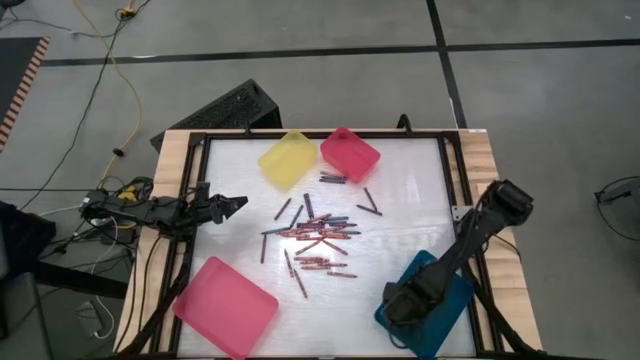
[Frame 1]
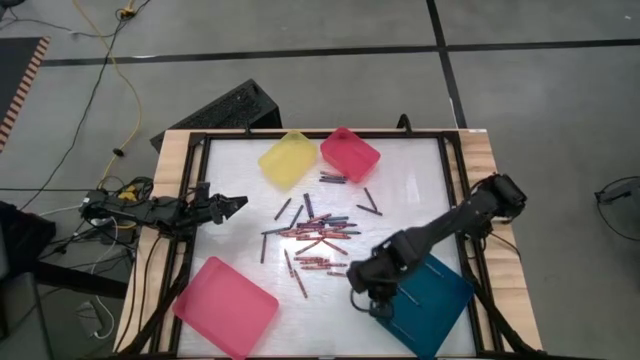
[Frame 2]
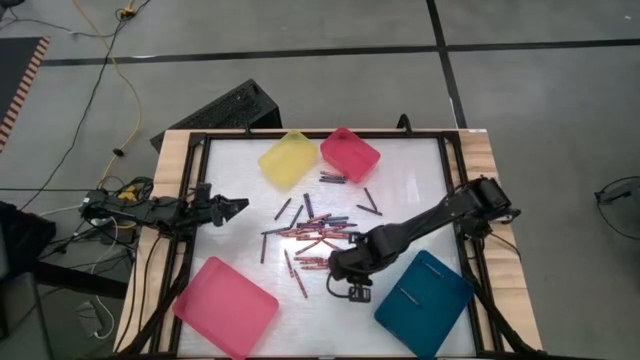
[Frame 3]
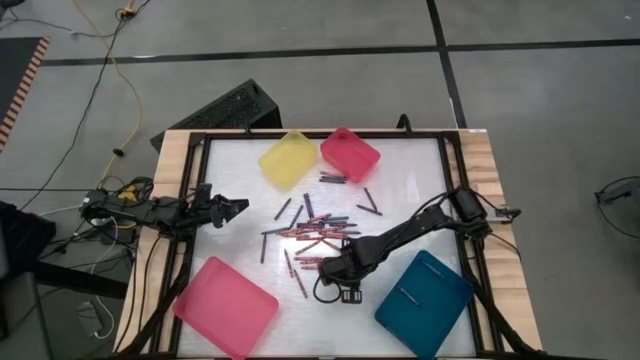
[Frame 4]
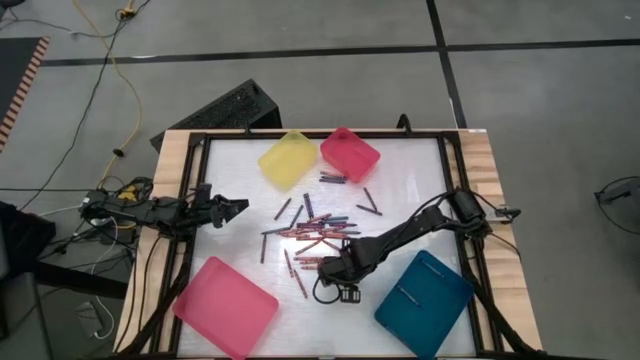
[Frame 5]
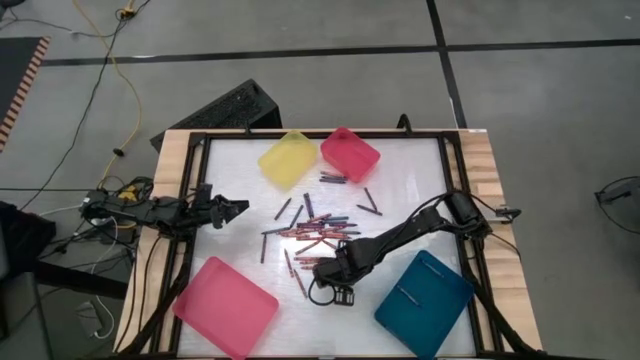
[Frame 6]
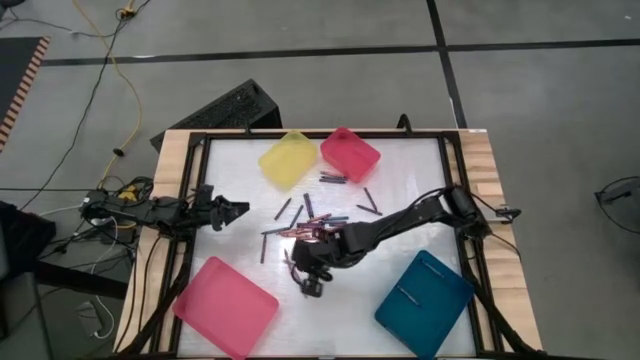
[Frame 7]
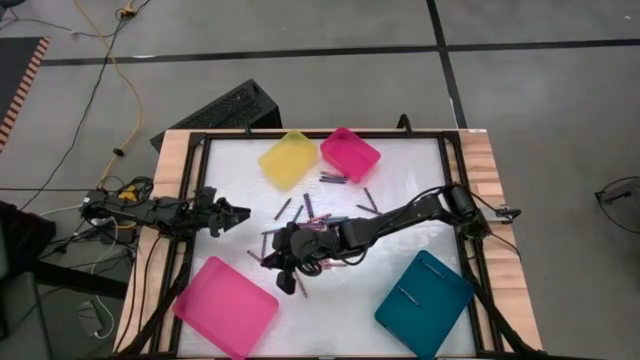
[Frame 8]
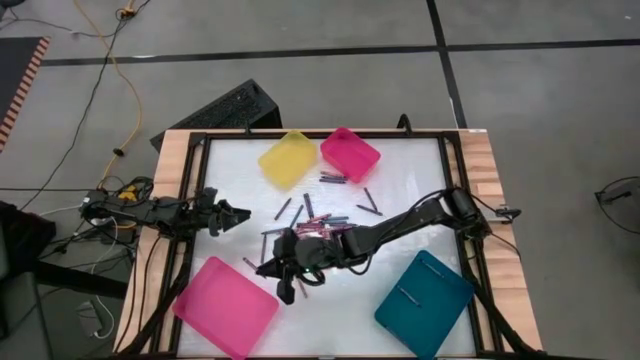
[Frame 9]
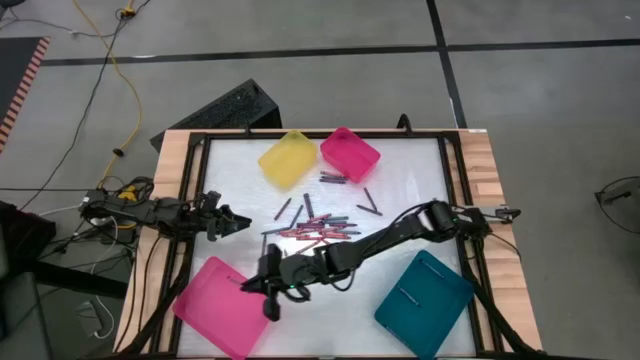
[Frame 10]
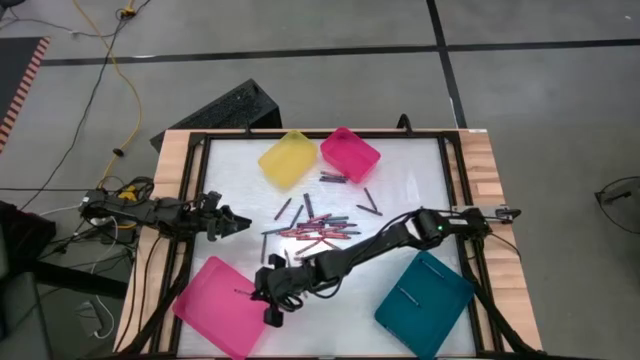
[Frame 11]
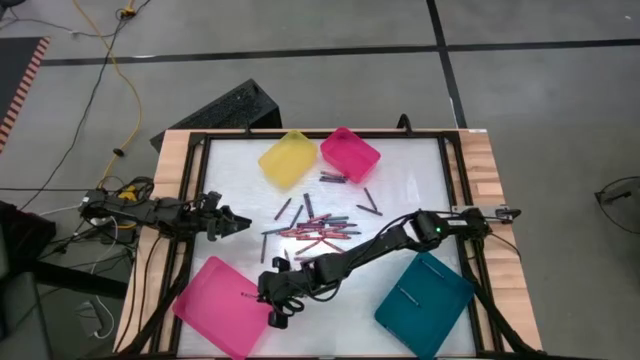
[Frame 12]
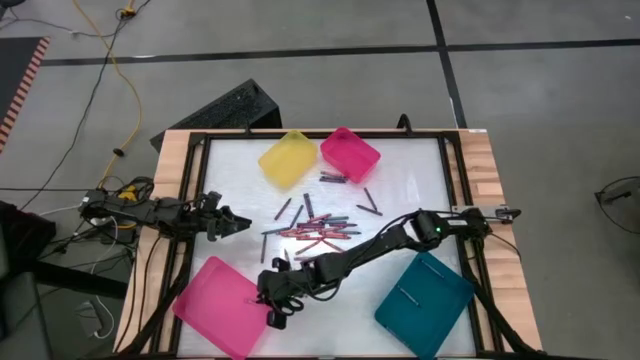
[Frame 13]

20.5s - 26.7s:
Task: Sort crayons
Put the red crayon into the pink bin

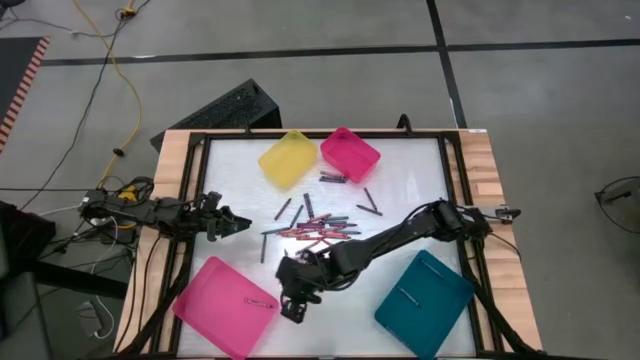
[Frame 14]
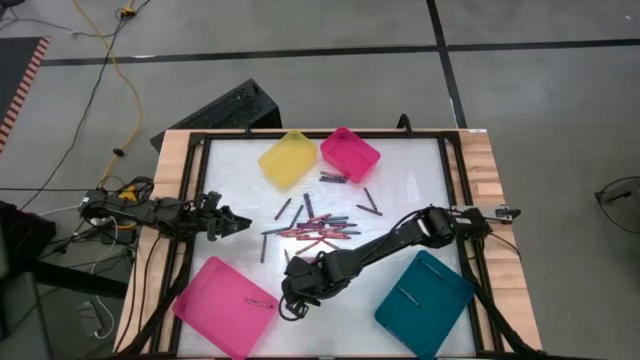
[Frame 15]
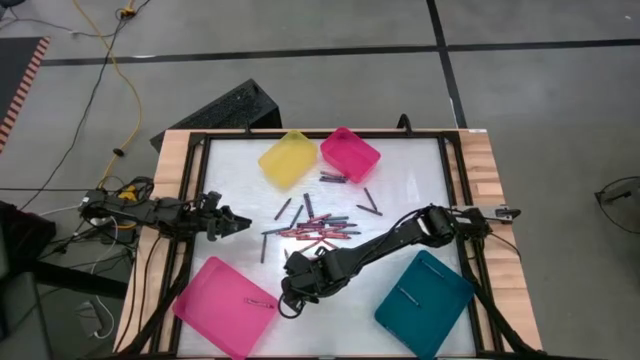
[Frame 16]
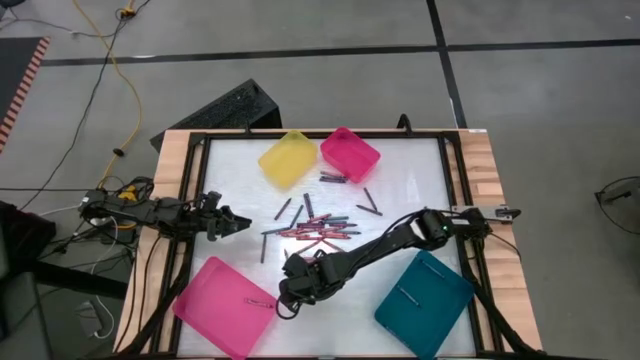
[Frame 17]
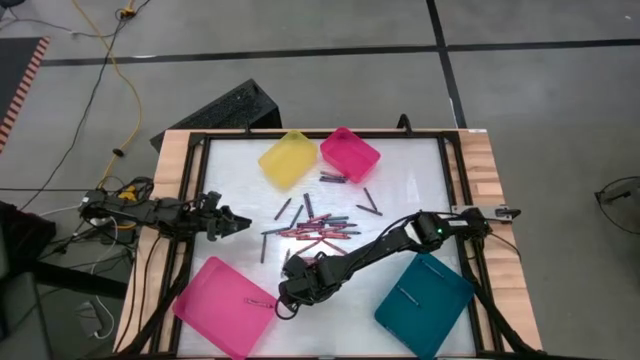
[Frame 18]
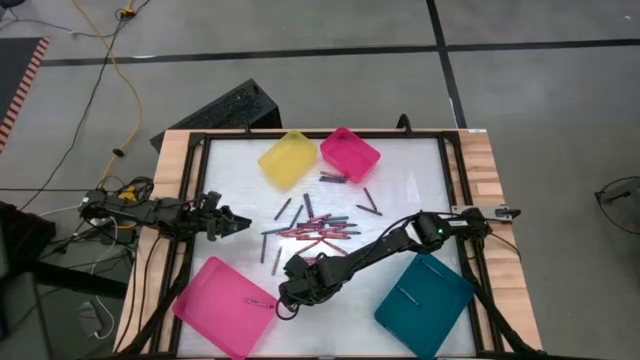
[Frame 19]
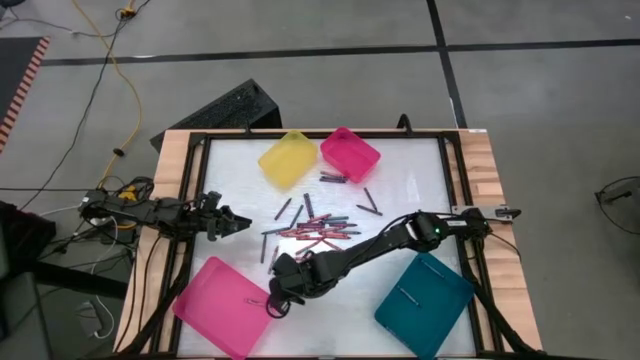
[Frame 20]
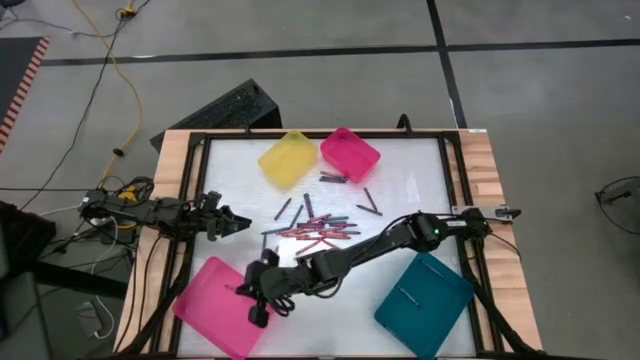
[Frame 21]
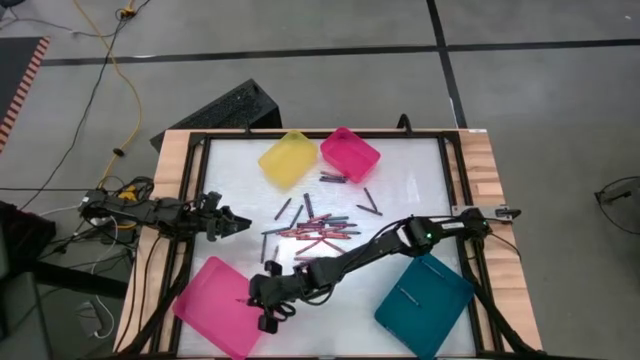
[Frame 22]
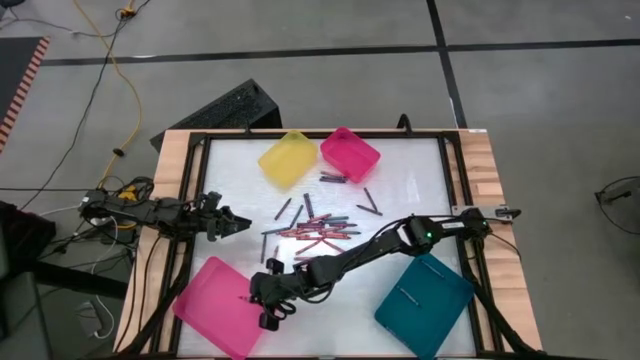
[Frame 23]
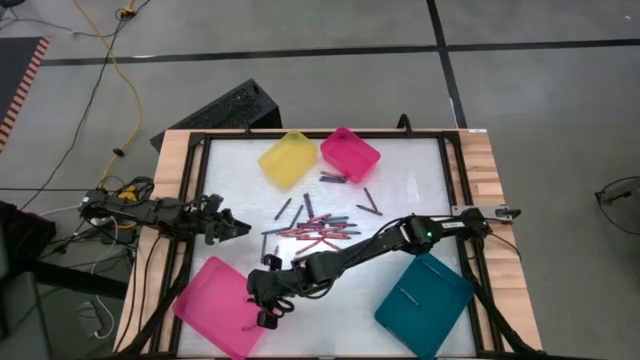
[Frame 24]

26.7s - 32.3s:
Put the red crayon into the pink bin

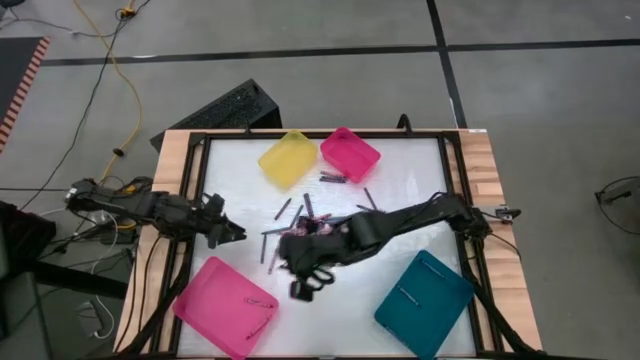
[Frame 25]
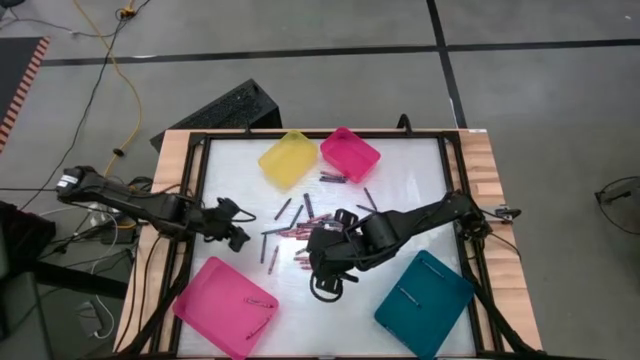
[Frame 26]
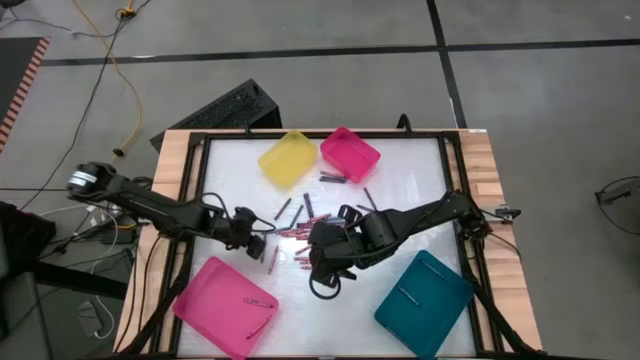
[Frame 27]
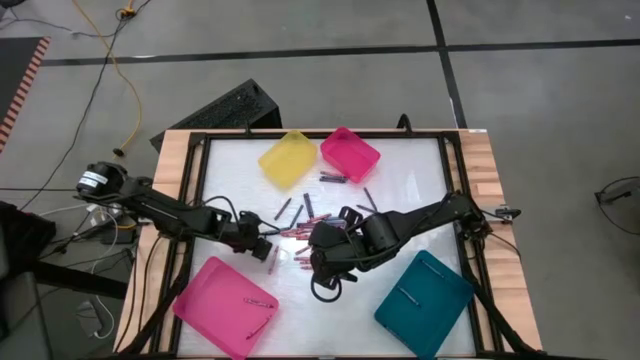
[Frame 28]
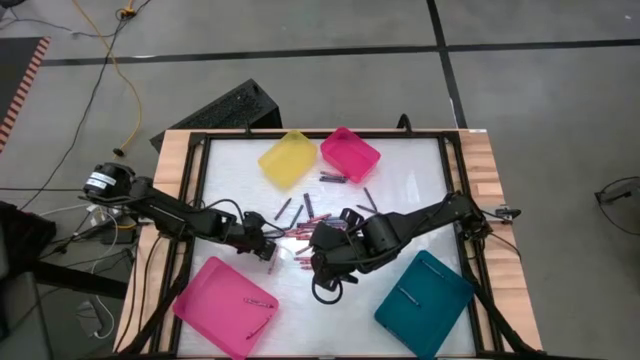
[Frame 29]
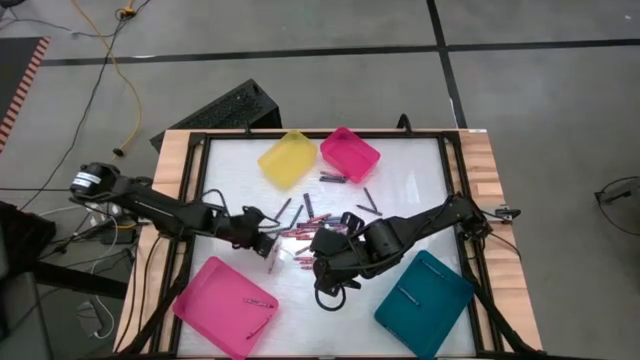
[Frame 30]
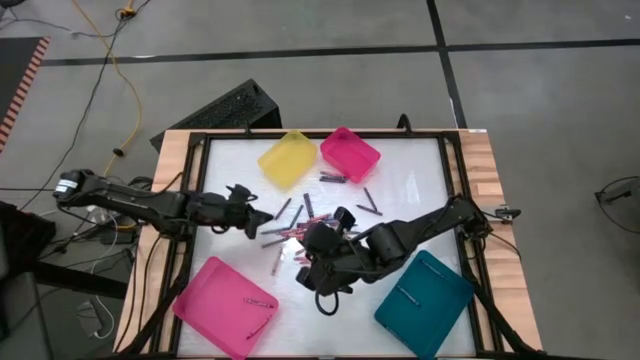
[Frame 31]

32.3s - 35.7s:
Put the purple crayon into the yellow bin

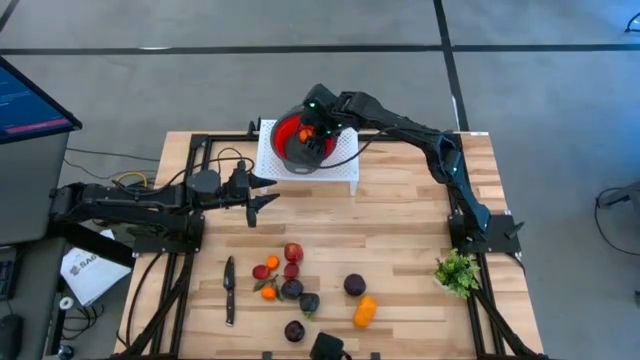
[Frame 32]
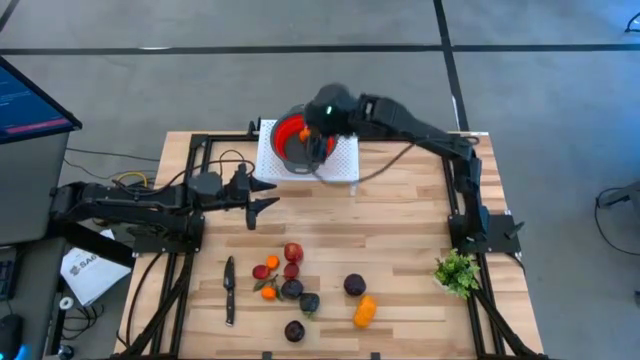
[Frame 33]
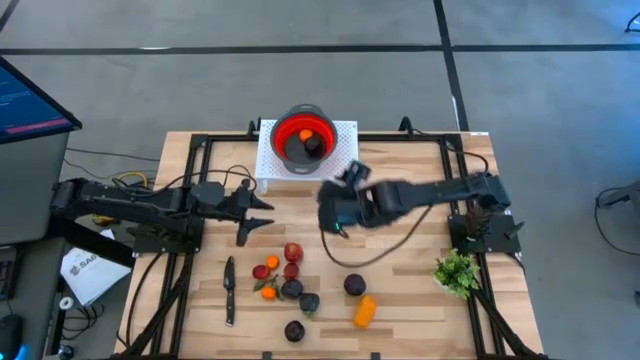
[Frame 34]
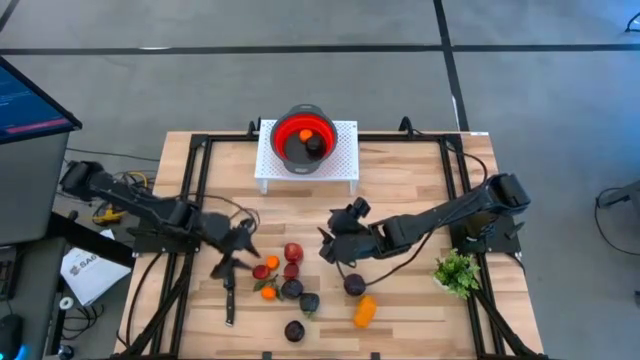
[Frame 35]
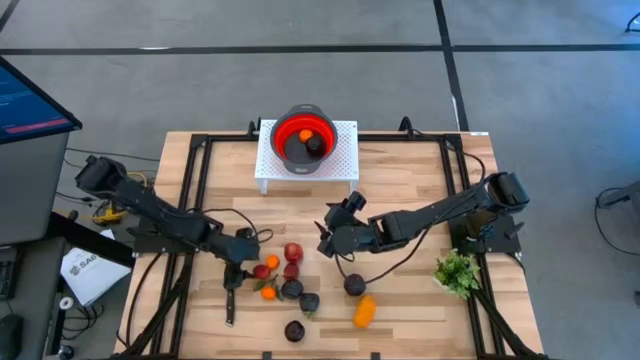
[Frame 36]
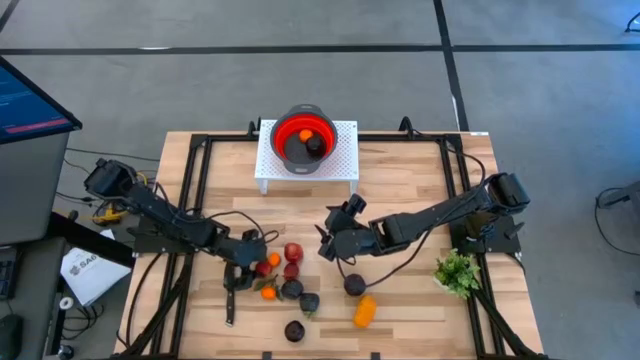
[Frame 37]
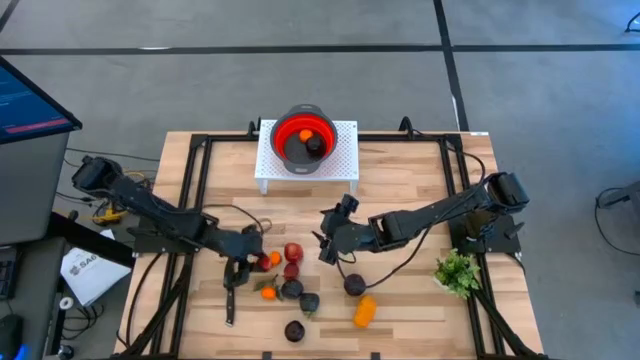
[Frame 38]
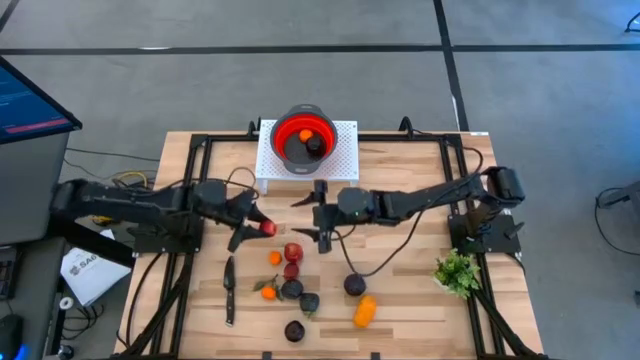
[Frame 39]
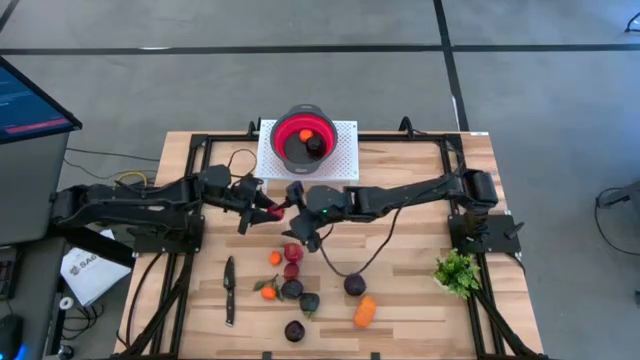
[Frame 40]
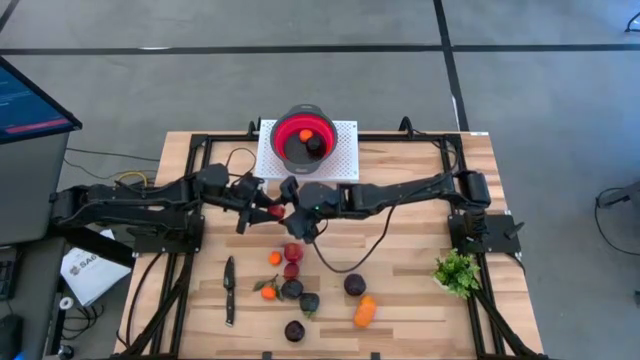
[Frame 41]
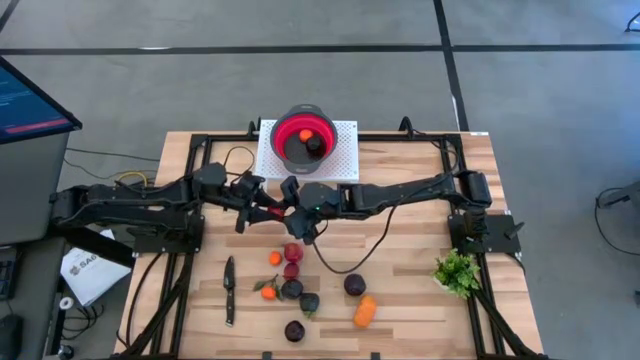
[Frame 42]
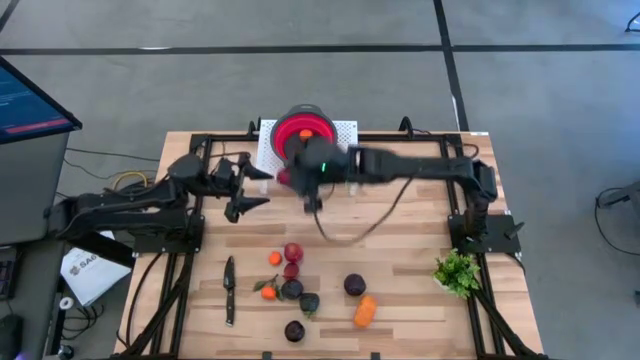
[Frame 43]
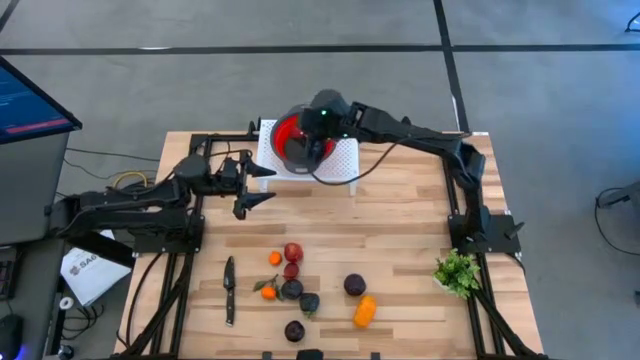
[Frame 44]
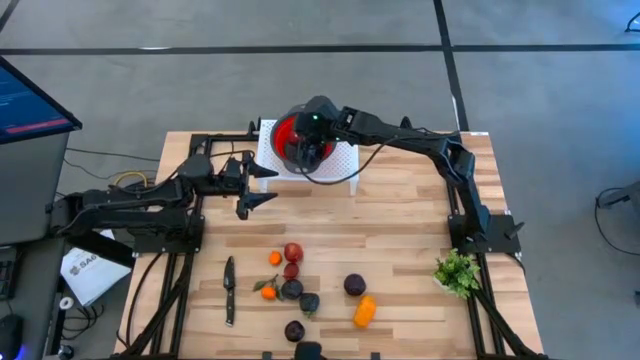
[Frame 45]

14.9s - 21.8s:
Task: Pick & Place Fruit
Put the pomegranate into the red strainer bowl
